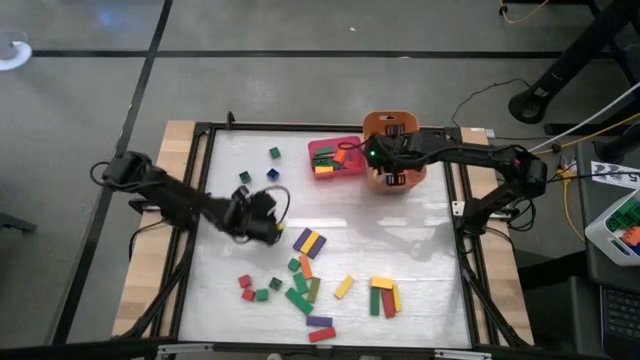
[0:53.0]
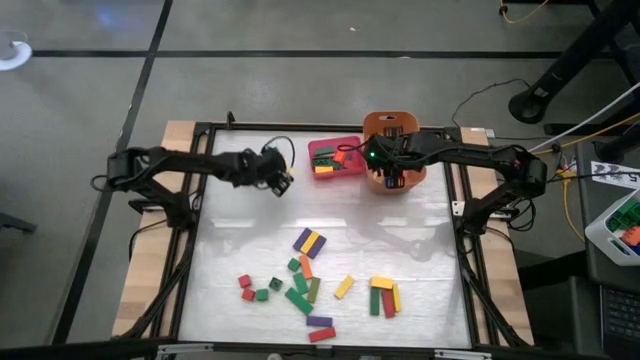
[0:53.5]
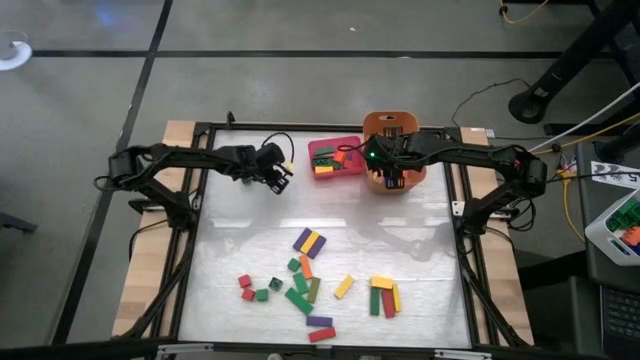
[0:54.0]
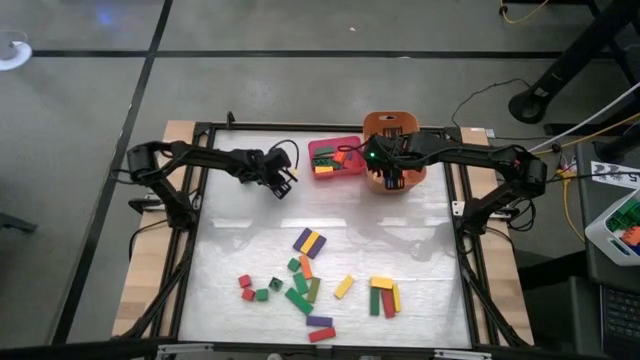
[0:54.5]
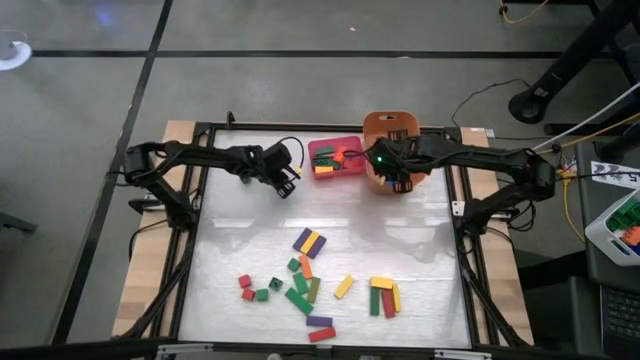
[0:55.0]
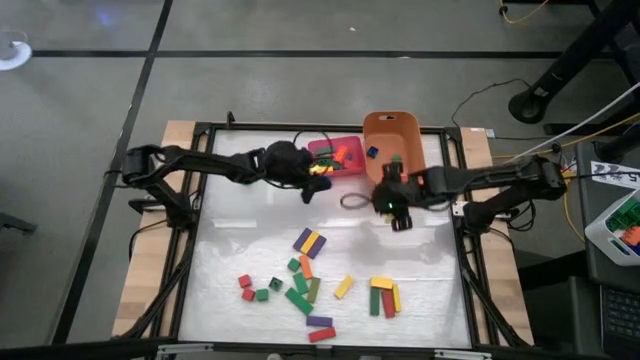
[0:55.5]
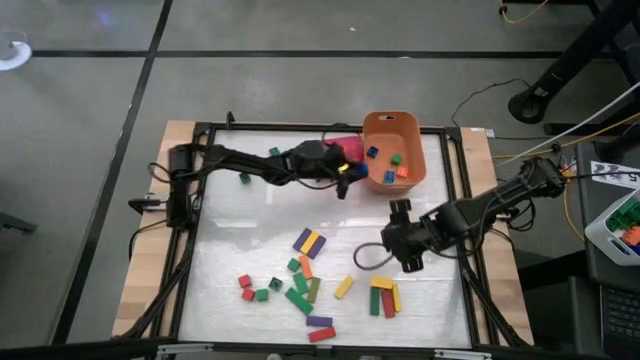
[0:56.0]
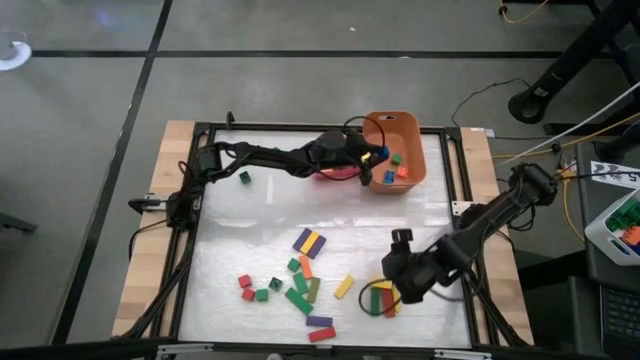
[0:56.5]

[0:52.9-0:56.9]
Task: Sort blocks by size
Put the small blue game piece into the orange bin

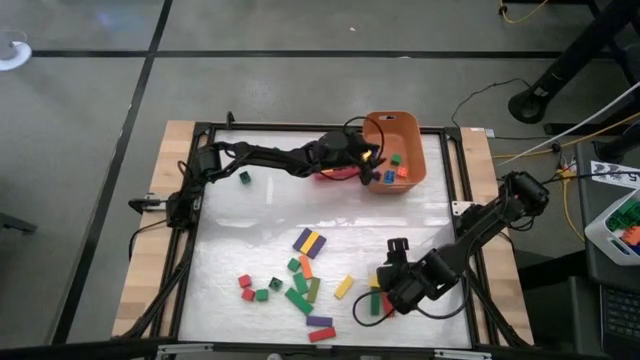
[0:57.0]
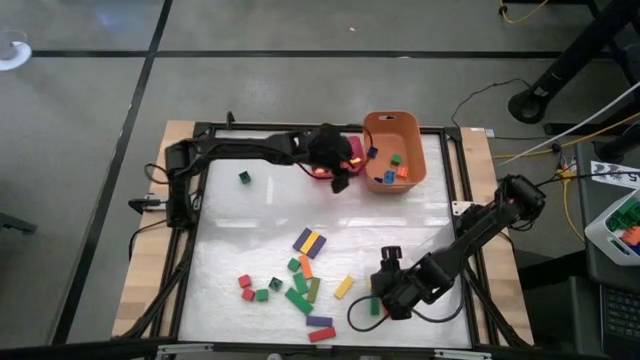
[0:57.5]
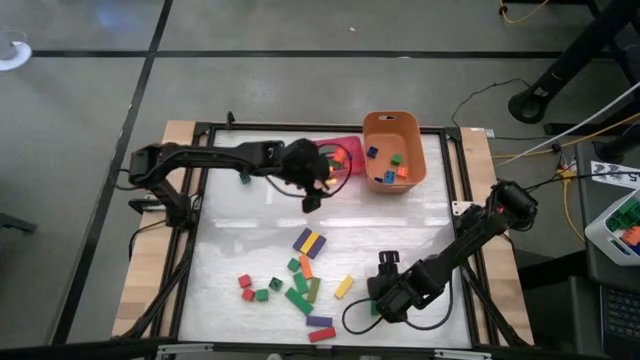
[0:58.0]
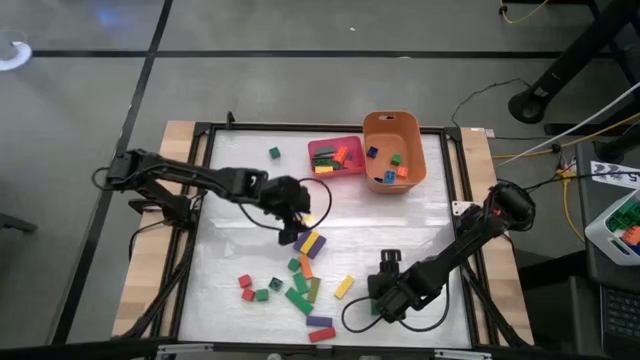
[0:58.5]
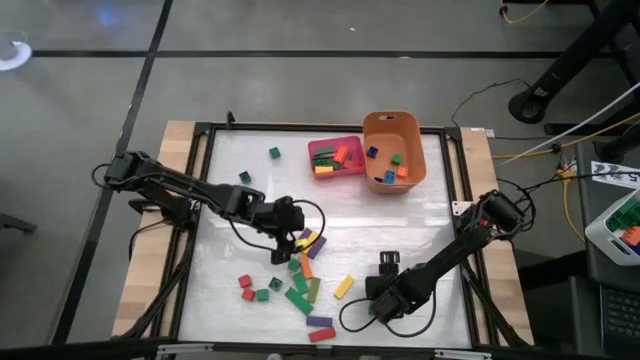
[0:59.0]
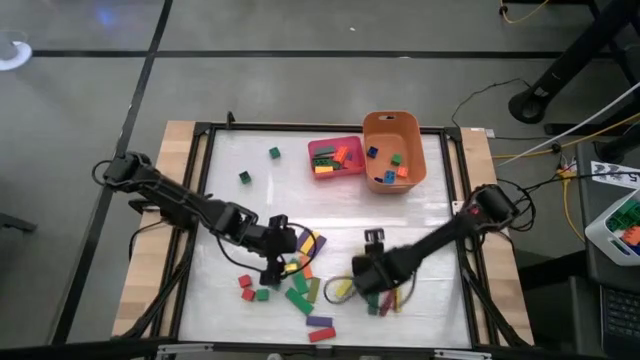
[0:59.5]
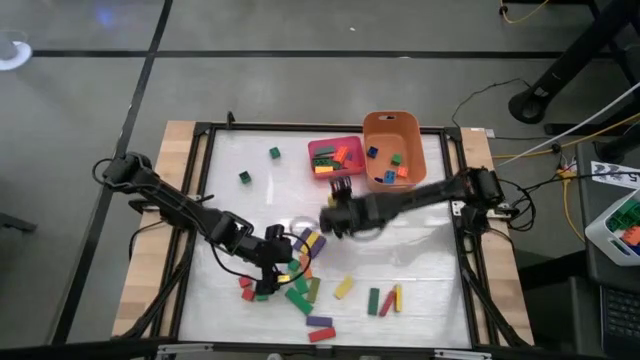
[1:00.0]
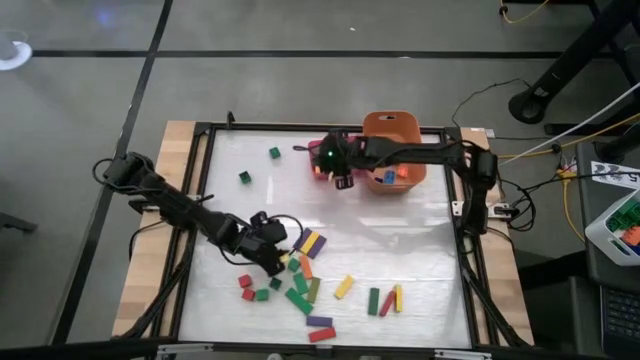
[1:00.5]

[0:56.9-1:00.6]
Put the large yellow block into the pink bin

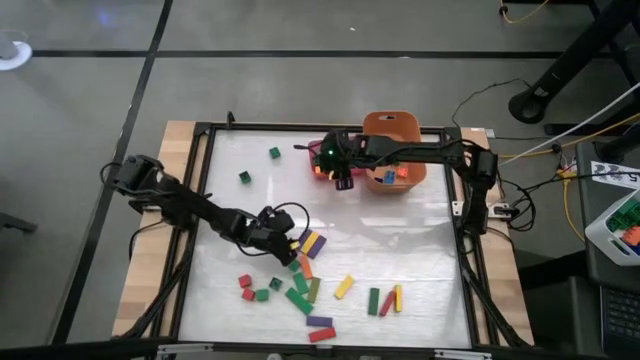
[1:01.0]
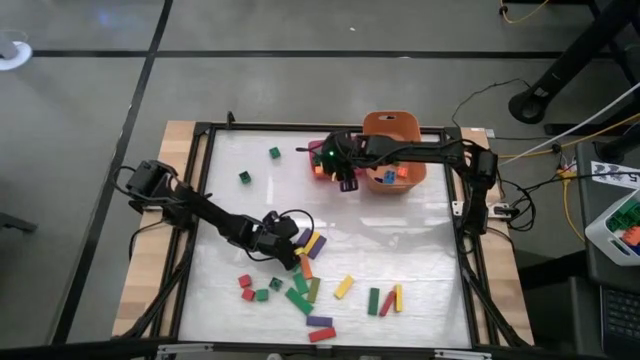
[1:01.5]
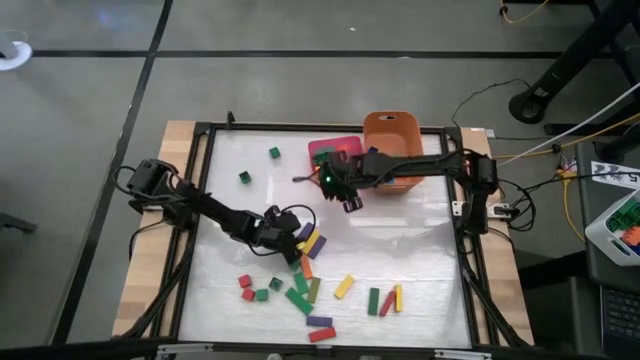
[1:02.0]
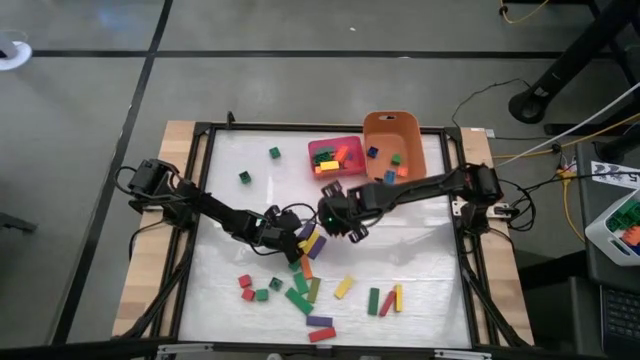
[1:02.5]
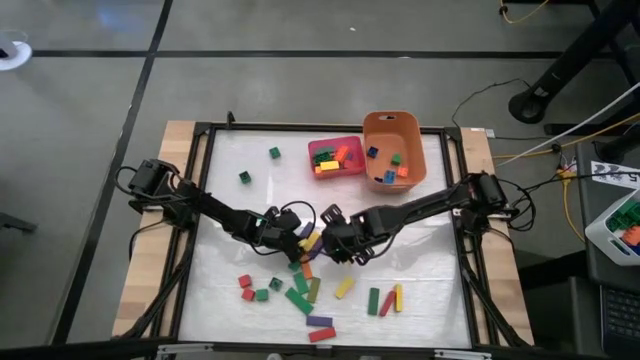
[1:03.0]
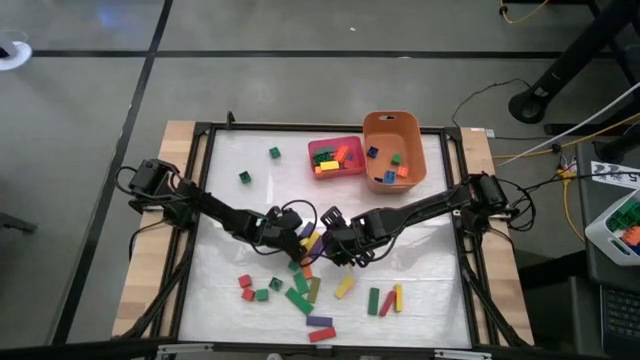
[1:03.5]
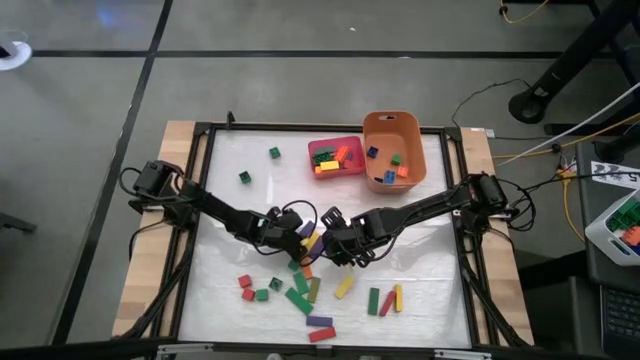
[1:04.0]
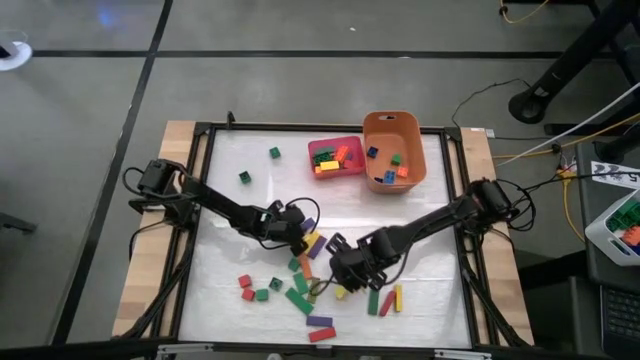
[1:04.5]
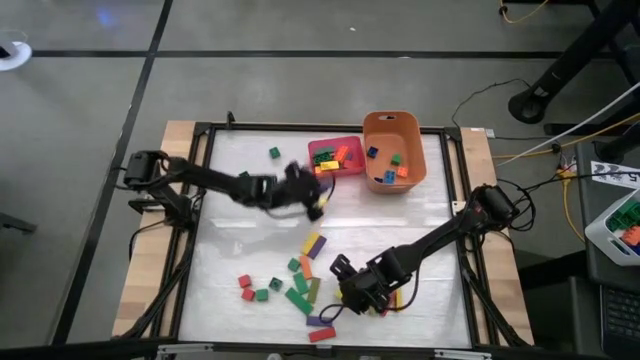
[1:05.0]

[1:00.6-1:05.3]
Put the large purple block into the pink bin

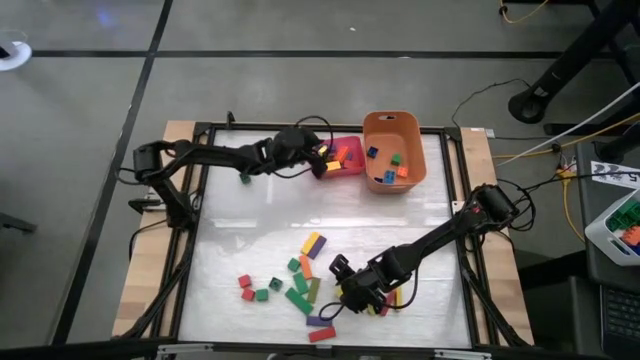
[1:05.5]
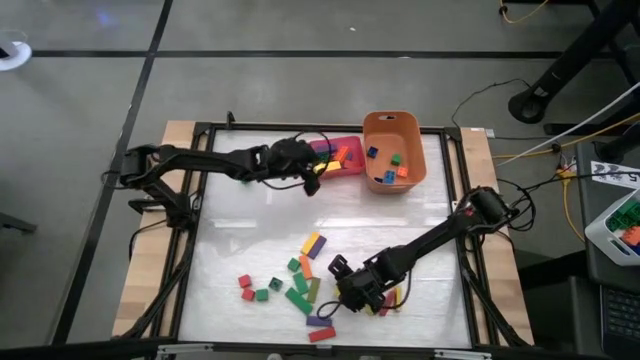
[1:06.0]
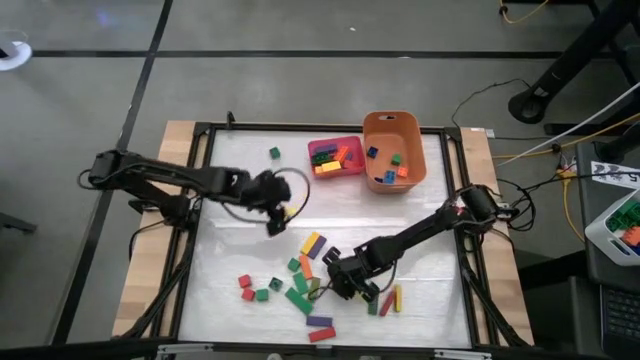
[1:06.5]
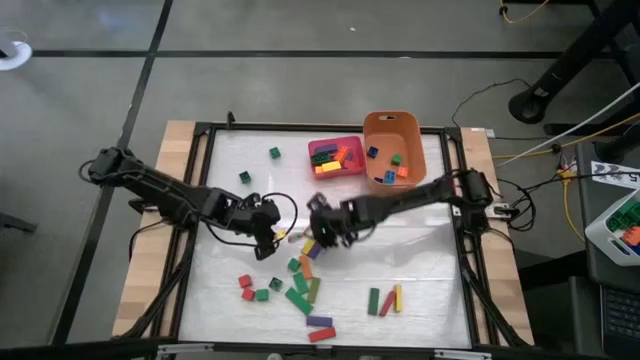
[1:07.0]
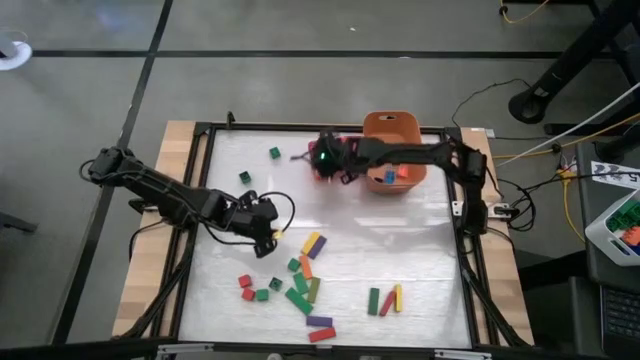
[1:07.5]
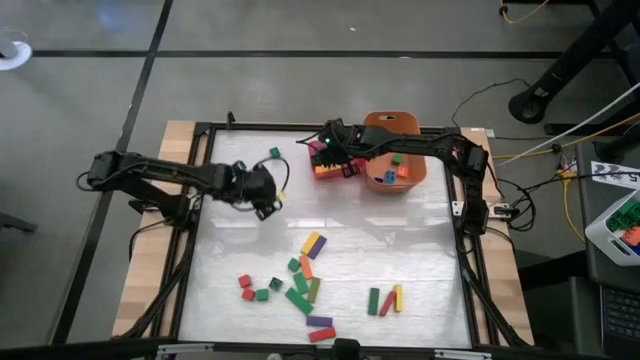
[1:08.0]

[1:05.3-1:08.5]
Put the large yellow block into the pink bin

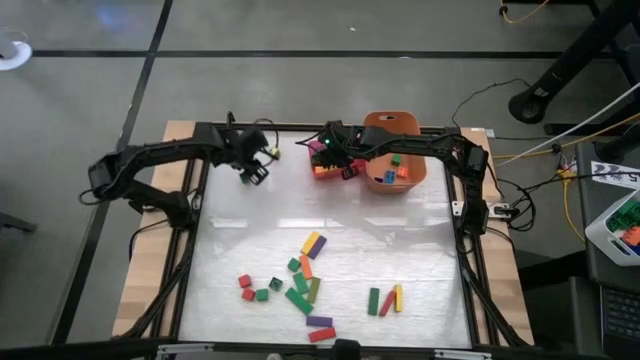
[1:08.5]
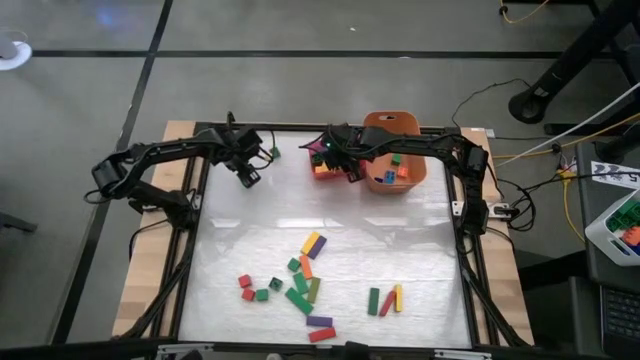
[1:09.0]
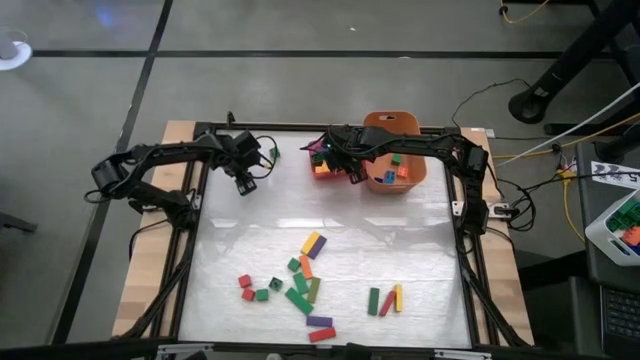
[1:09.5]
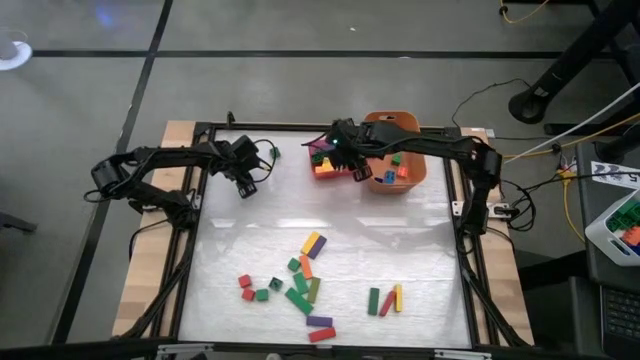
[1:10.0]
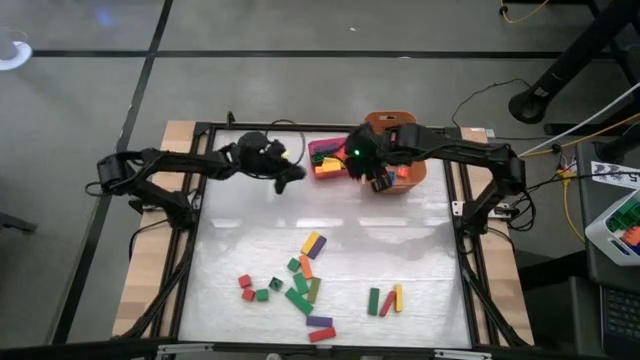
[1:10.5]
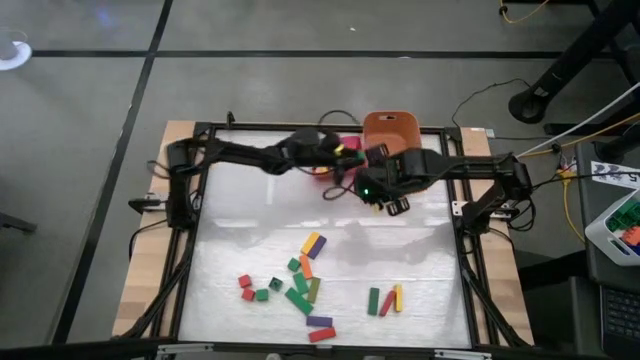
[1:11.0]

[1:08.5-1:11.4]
Put the small green game piece into the orange bin

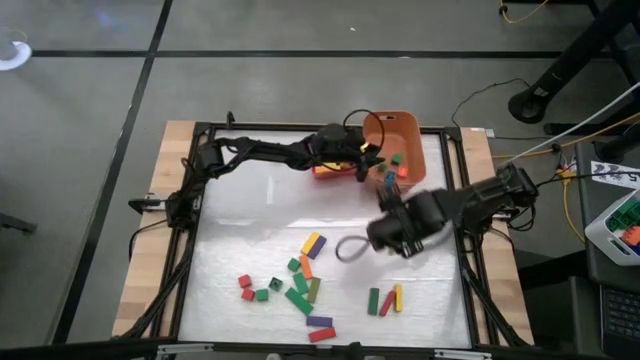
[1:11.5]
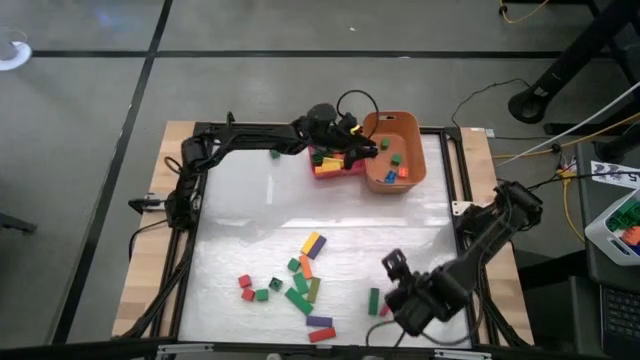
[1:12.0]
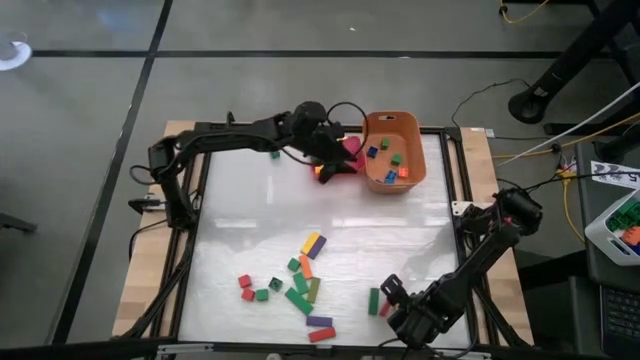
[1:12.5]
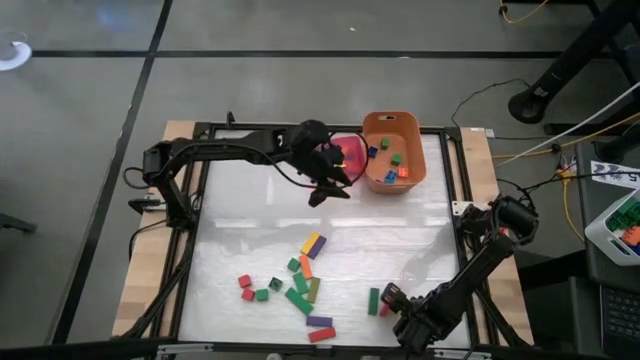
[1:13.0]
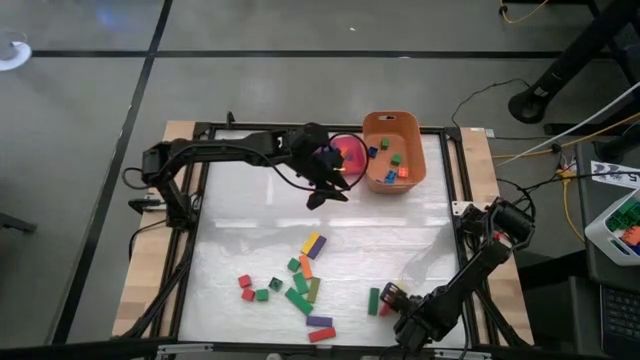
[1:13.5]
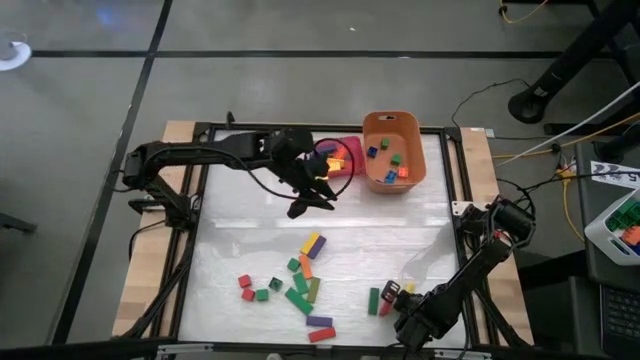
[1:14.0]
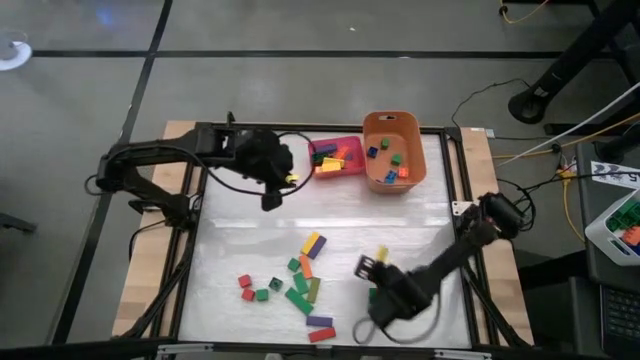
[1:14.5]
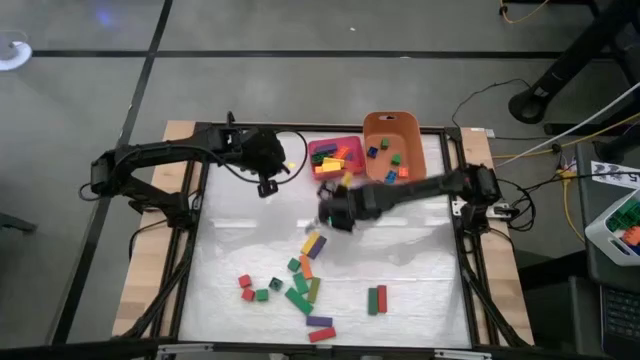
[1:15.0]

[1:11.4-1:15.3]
Put the large yellow block into the pink bin
